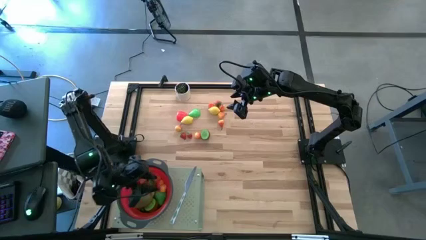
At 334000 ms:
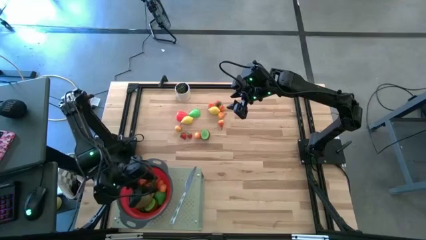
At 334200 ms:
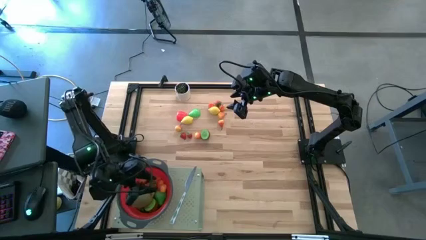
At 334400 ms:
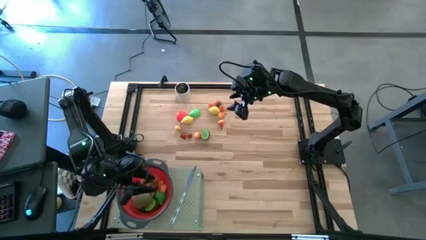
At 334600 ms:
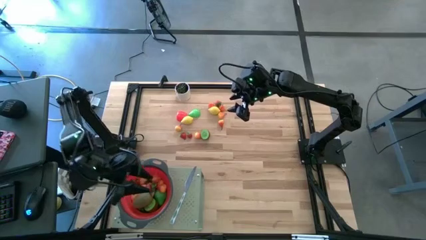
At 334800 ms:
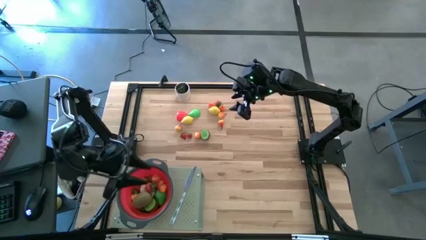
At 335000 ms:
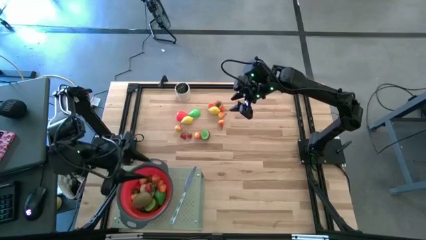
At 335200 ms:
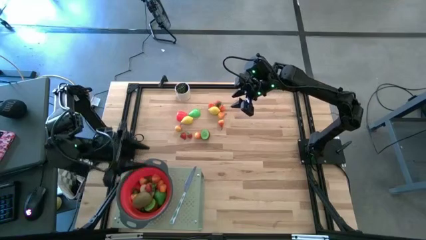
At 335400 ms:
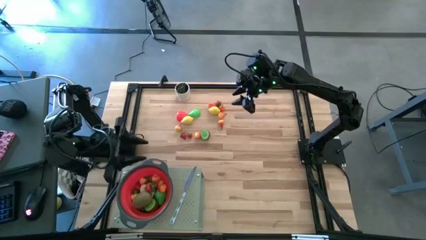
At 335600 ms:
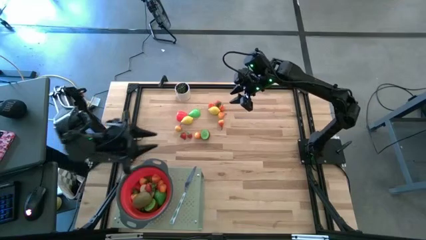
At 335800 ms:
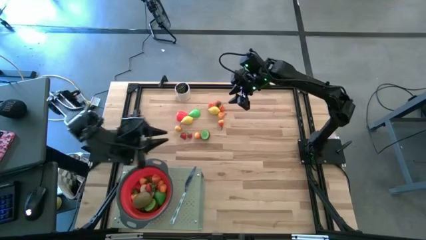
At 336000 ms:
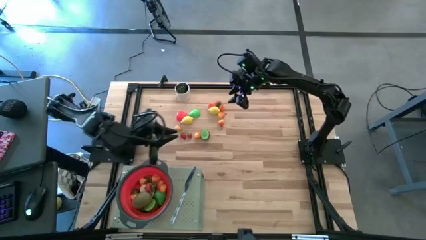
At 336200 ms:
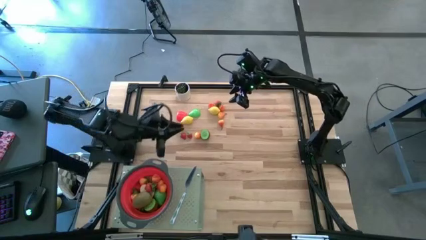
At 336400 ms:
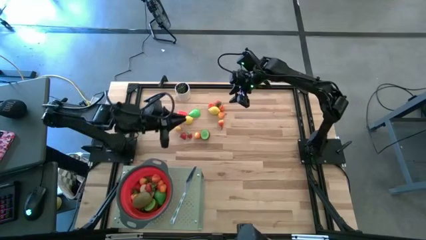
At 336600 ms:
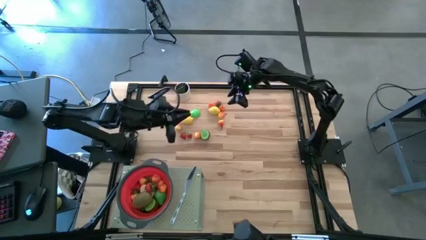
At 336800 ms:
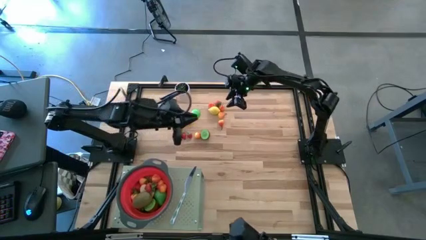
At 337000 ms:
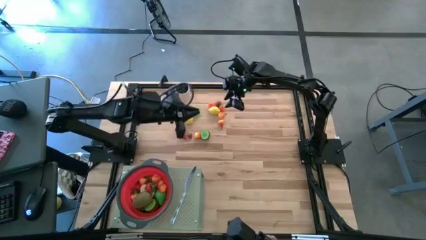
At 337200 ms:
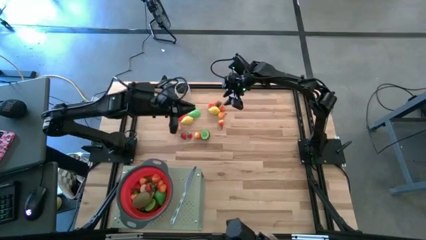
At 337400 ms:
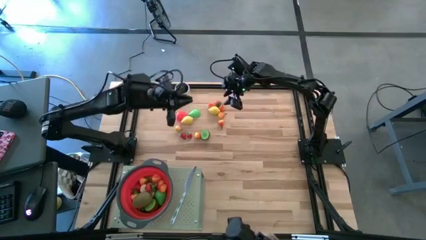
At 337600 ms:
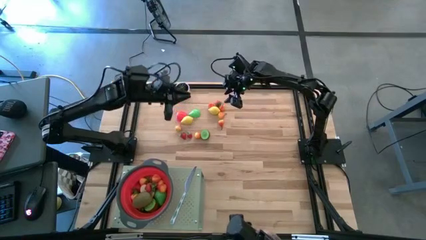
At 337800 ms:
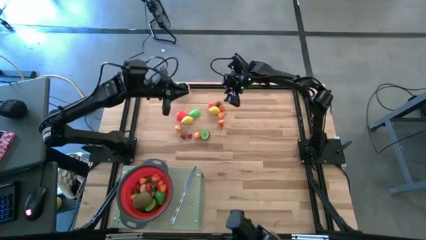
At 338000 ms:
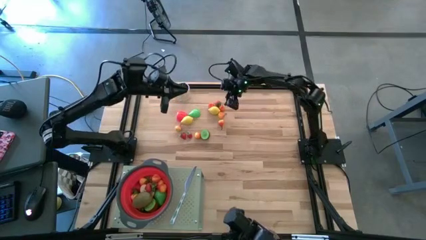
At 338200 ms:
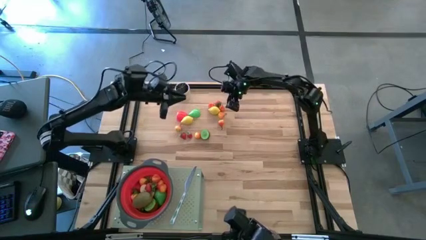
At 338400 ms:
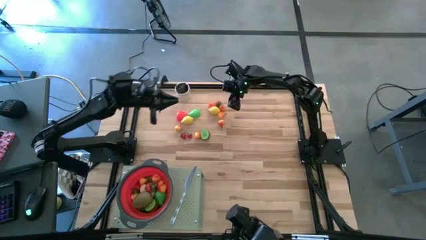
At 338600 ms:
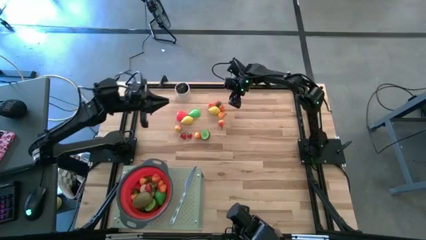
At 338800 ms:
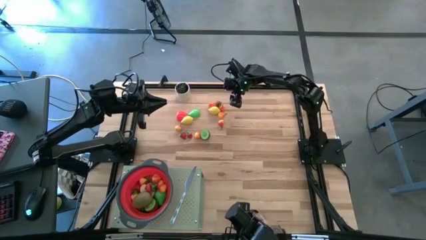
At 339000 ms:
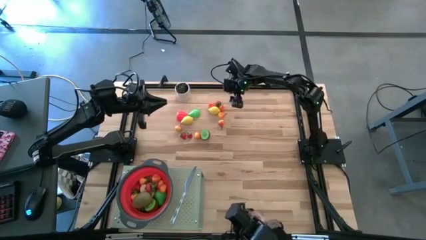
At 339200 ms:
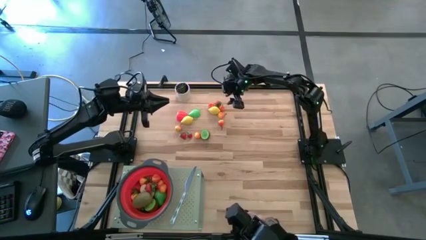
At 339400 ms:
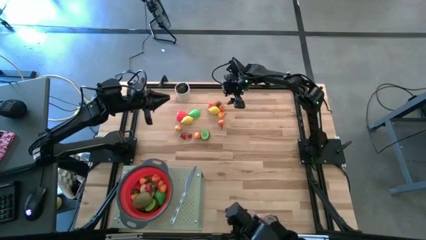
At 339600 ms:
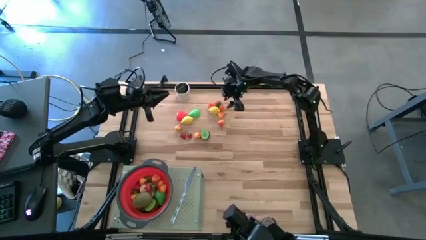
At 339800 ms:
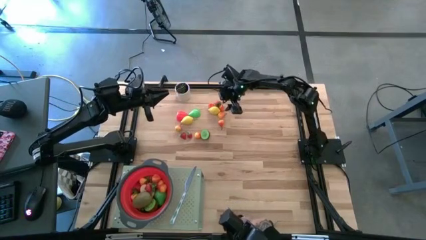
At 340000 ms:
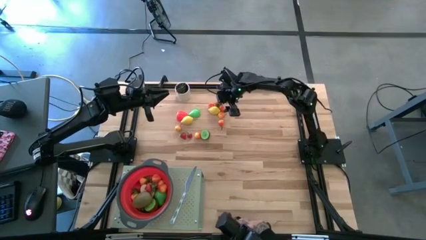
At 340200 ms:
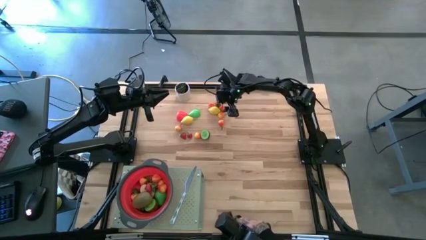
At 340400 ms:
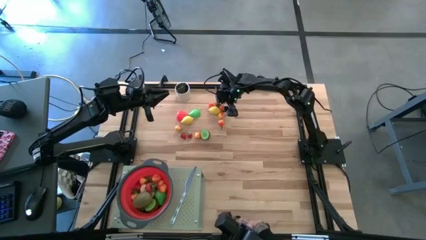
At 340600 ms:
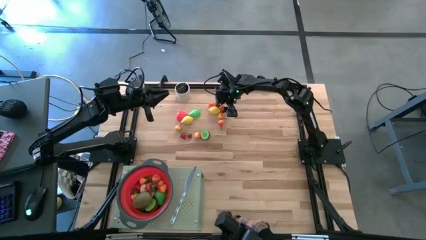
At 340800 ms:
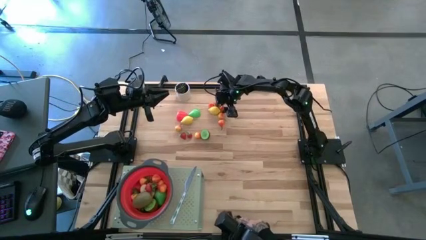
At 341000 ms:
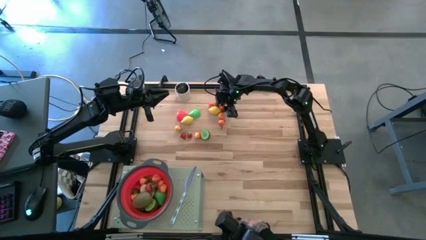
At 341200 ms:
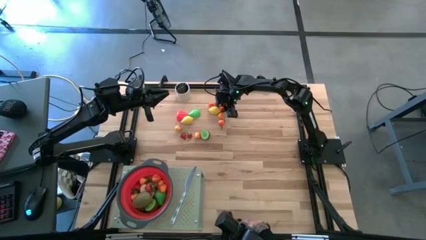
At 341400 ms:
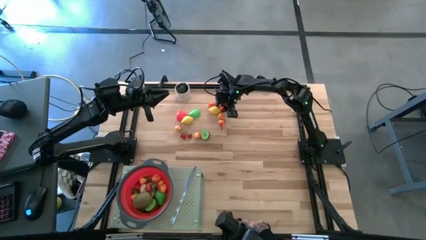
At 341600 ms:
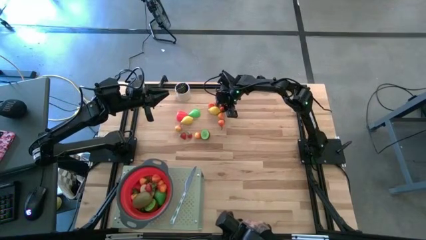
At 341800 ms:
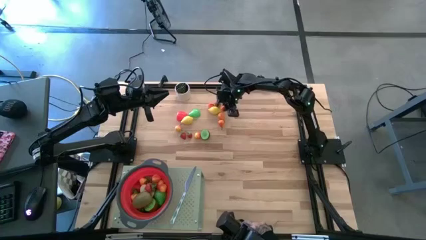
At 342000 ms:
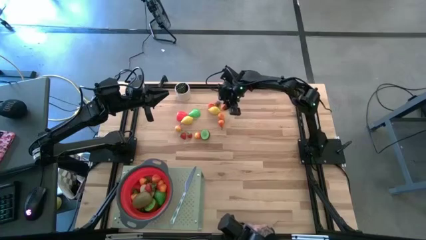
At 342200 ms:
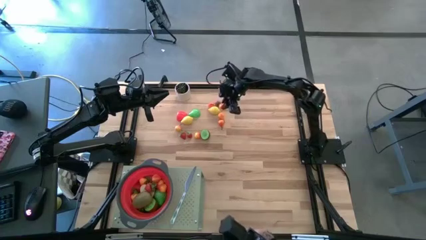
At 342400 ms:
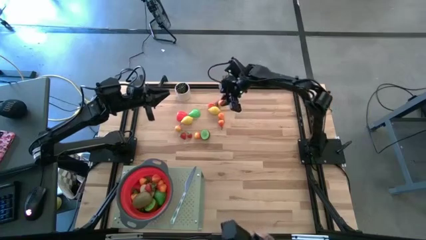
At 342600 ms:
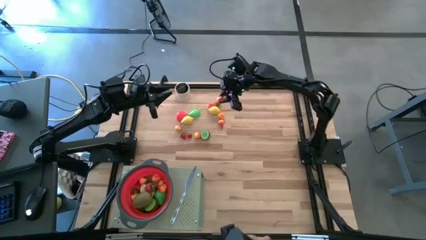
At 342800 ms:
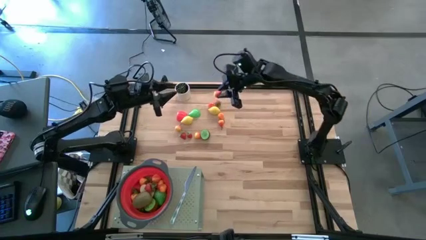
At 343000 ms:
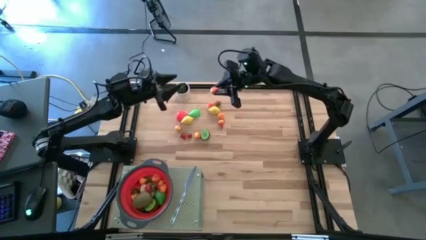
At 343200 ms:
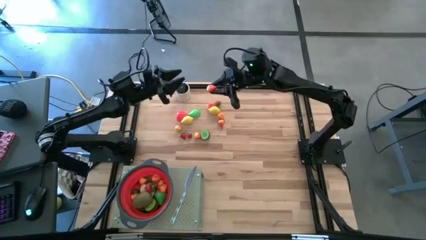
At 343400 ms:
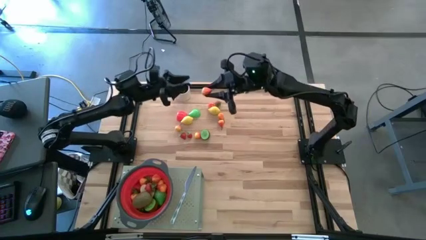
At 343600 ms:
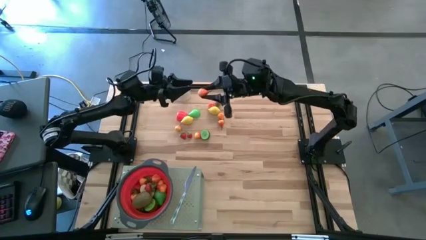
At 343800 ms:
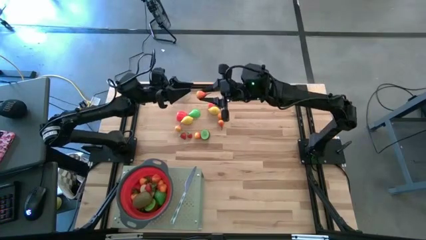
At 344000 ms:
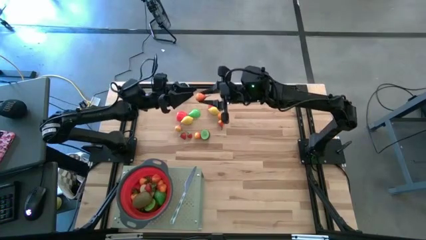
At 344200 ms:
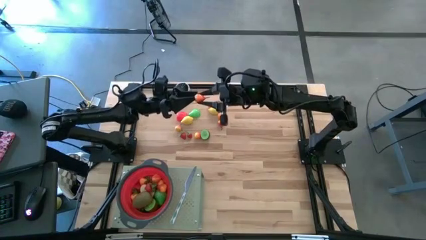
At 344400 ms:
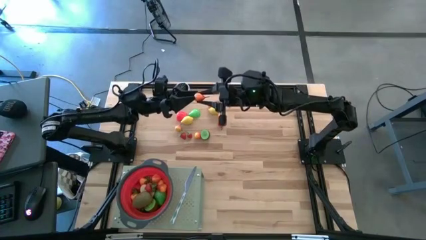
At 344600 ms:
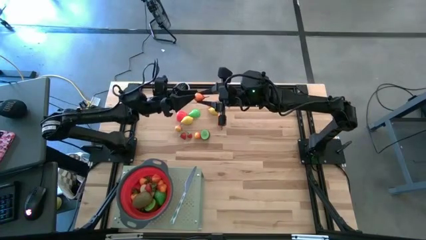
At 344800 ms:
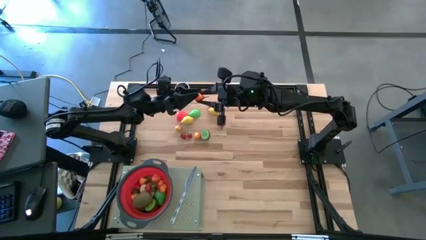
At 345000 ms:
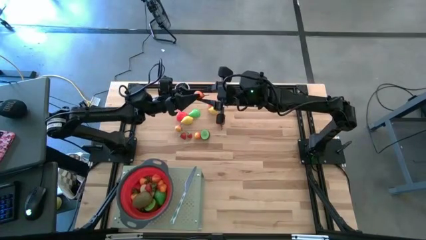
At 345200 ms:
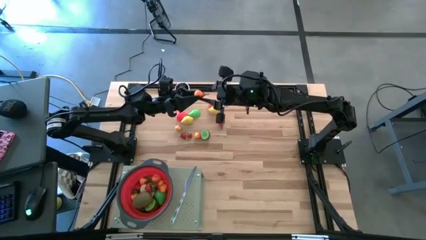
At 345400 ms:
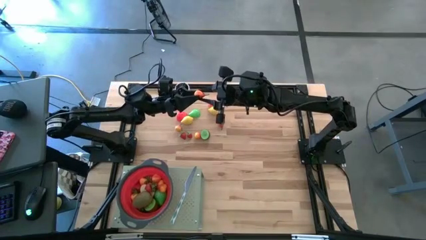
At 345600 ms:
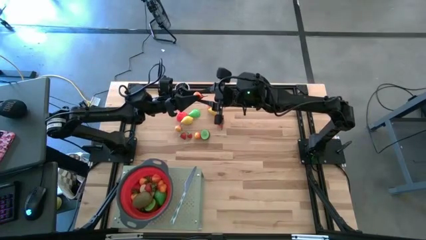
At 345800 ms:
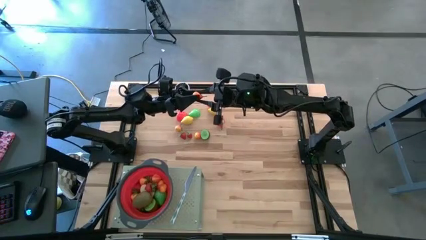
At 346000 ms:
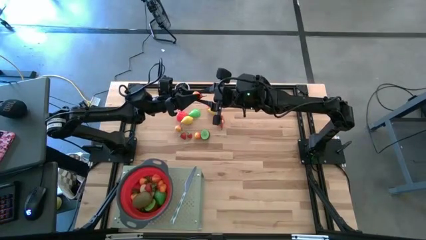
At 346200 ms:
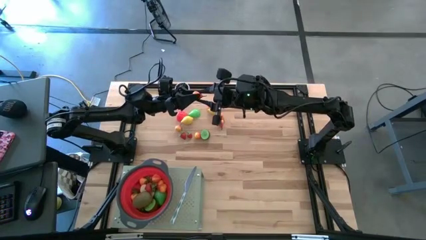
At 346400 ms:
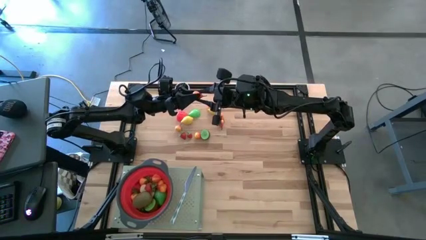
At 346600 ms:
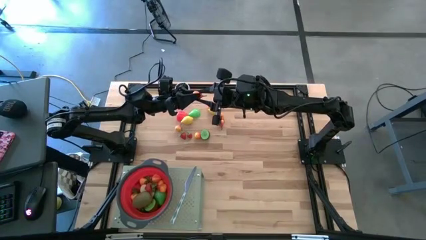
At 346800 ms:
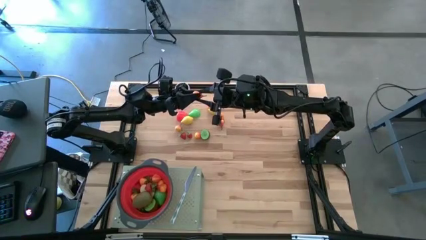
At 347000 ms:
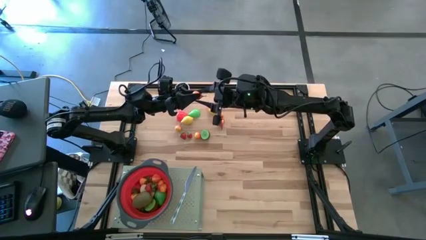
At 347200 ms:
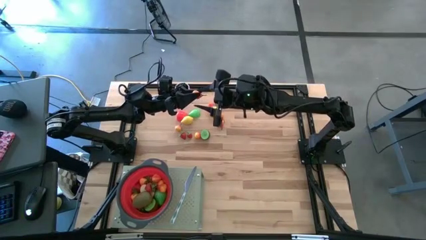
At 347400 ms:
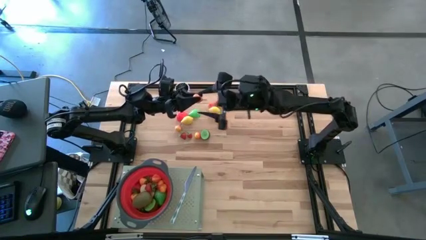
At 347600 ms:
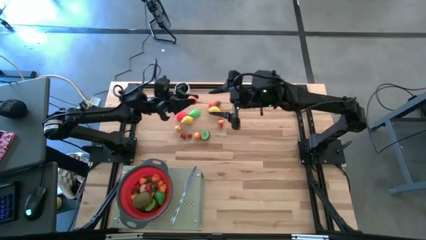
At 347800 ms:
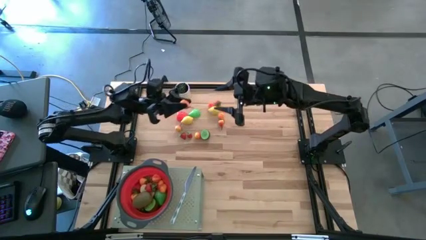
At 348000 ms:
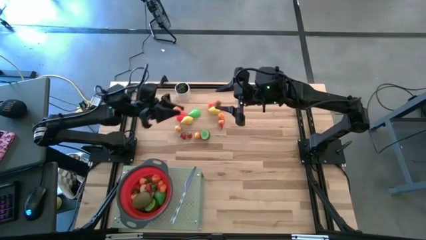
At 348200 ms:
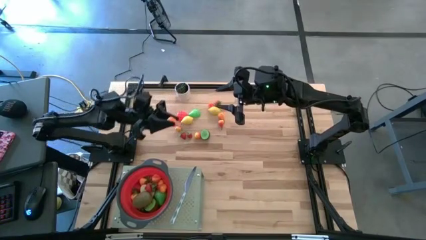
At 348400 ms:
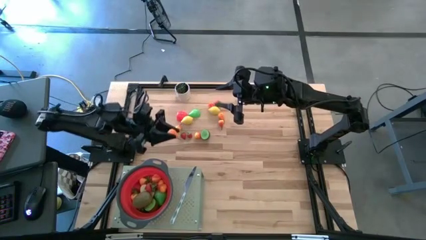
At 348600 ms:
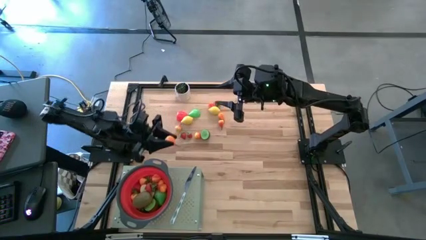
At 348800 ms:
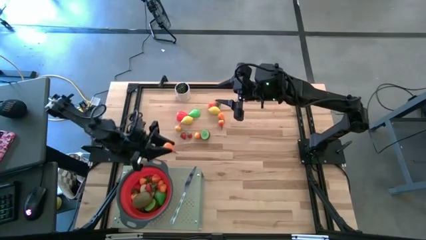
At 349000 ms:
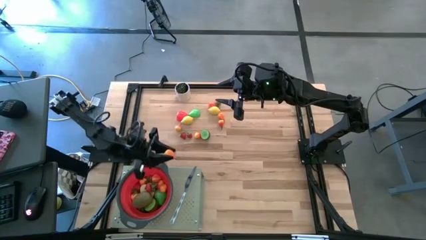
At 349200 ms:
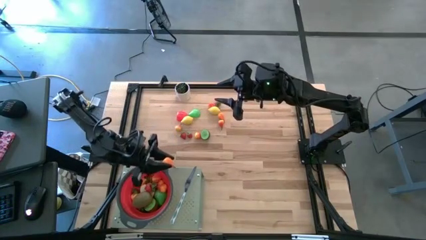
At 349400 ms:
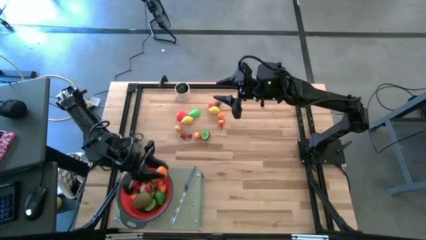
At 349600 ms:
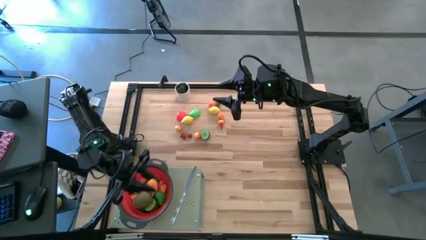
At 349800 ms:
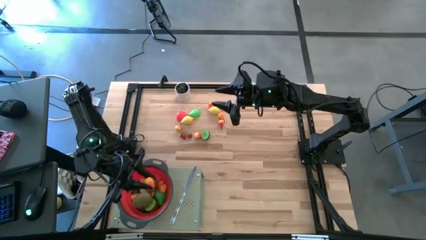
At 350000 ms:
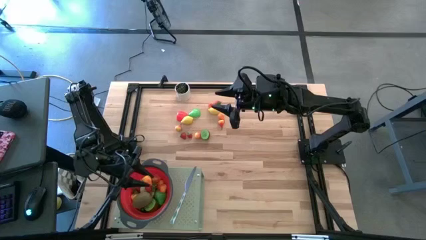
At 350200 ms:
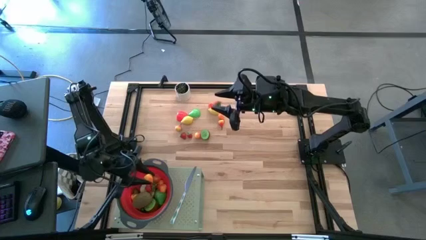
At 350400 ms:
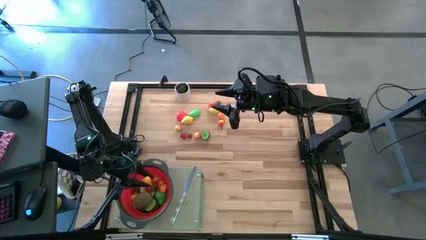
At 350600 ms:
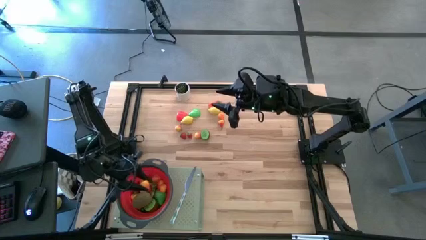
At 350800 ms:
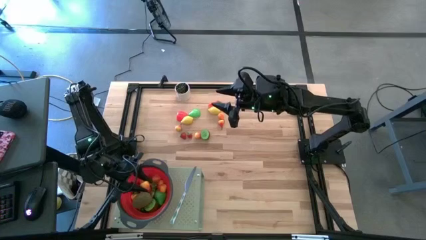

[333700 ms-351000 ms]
Task: Pick & Place Fruit
Put the pear into the red strainer bowl on the shelf
